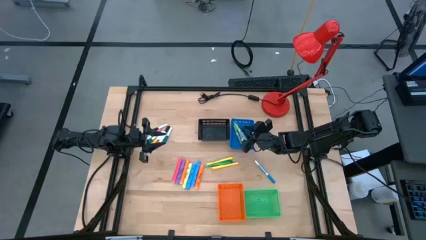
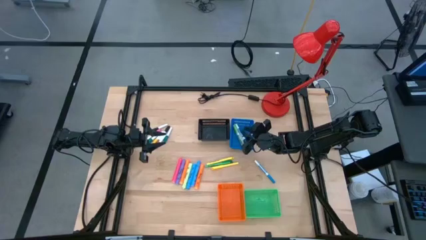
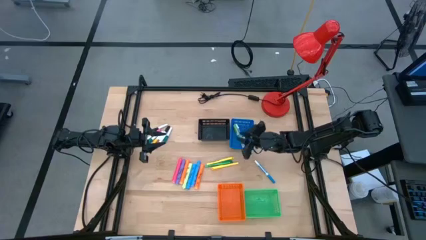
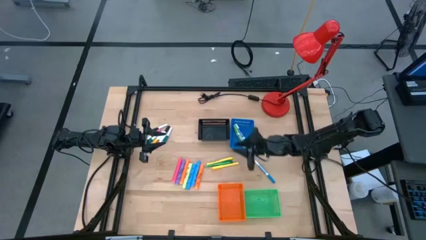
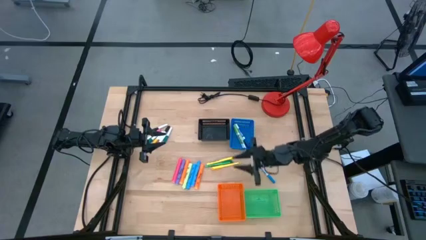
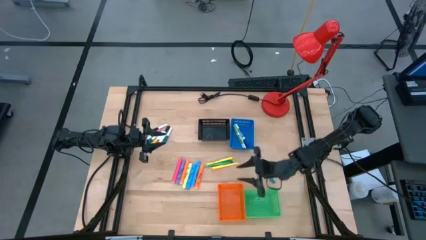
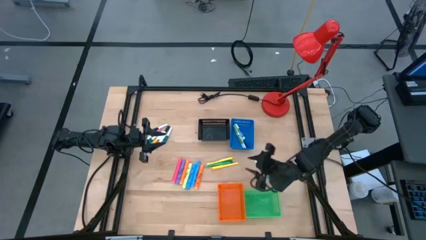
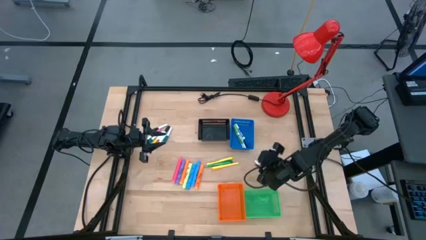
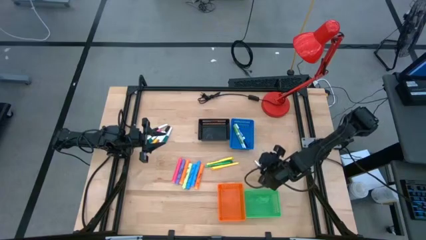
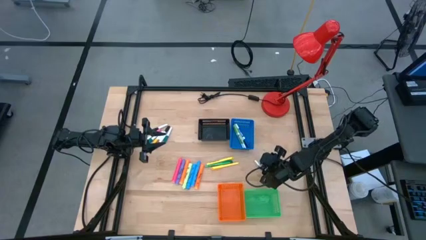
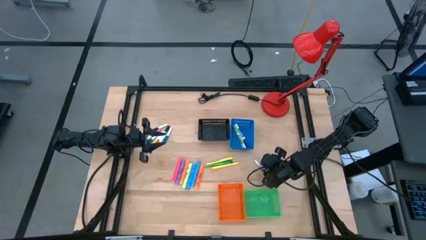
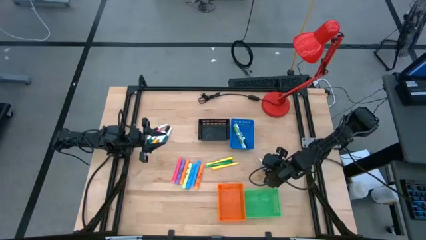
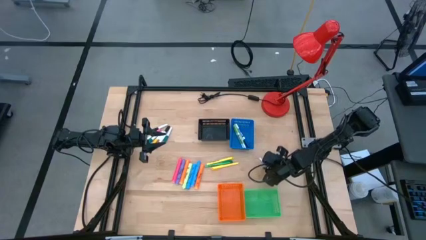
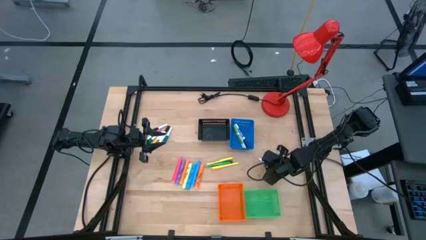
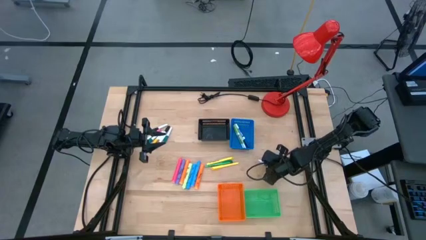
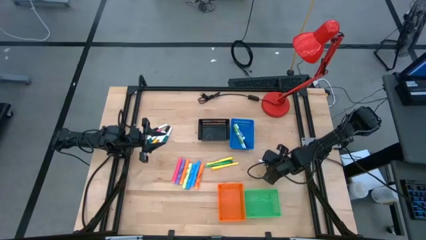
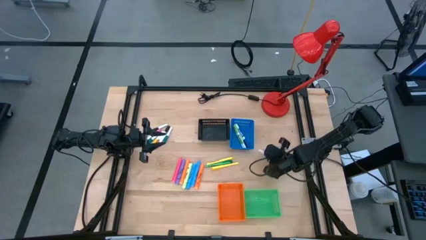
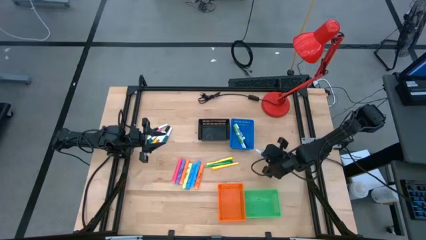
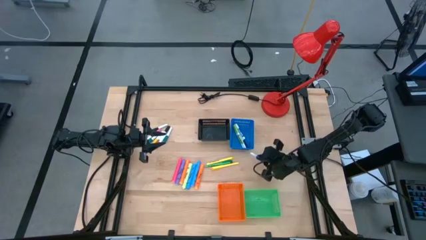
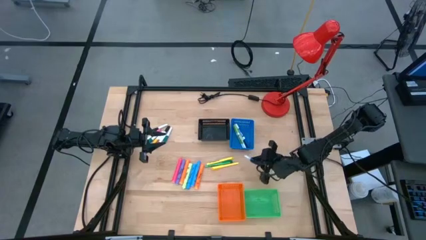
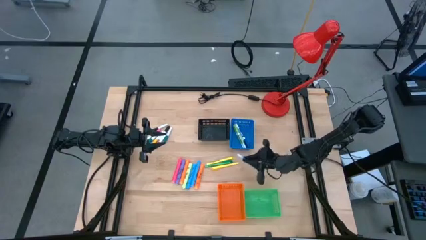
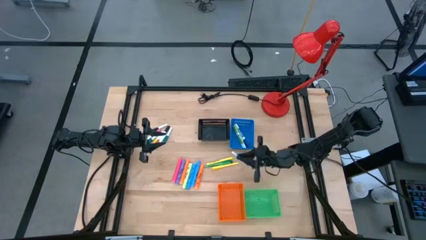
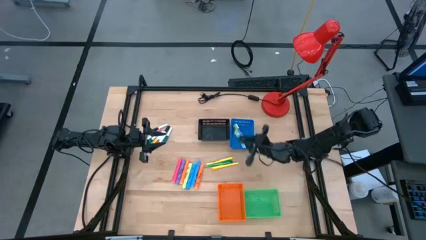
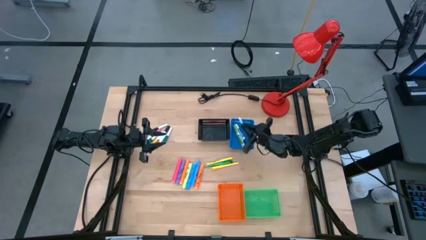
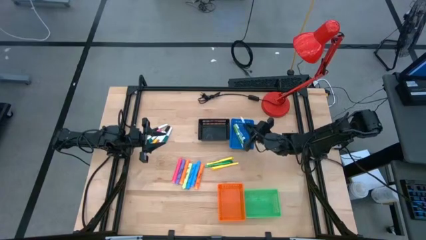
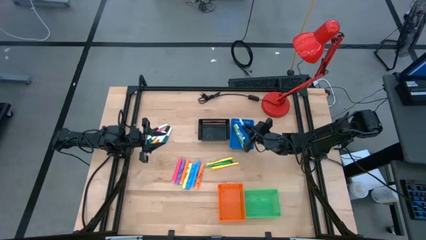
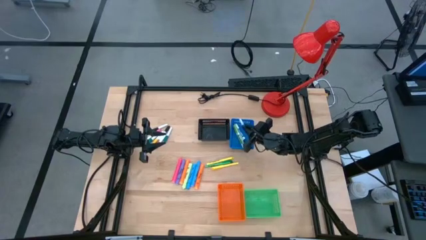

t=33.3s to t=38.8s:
Task: Pick & Place Markers
Put the blue marker pen into the blue bin

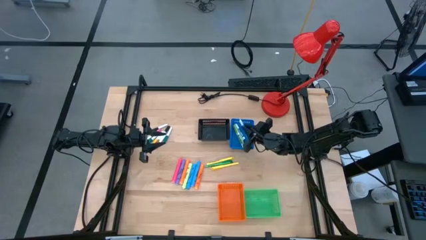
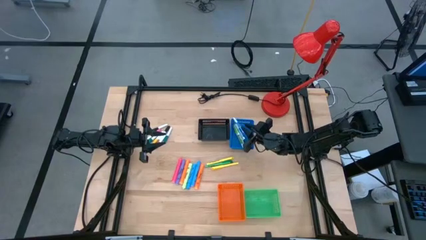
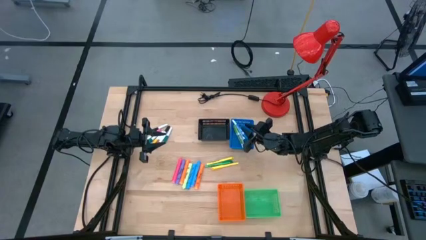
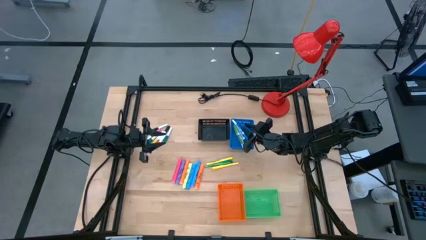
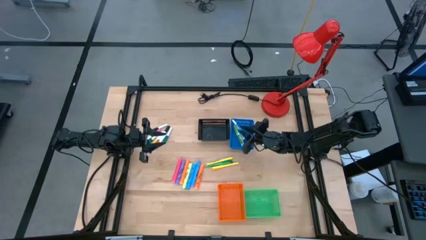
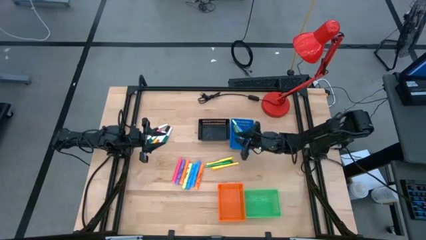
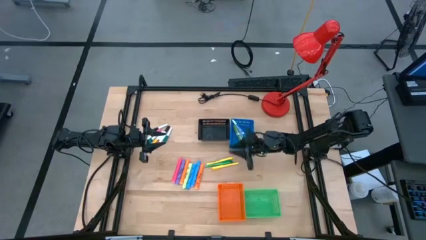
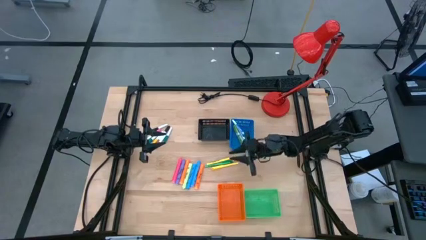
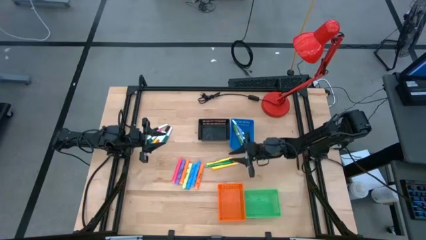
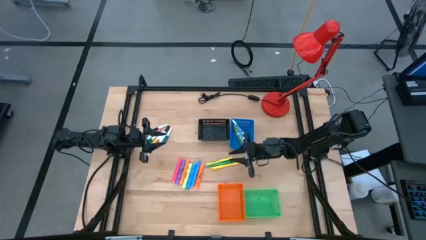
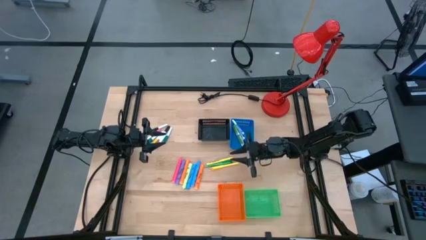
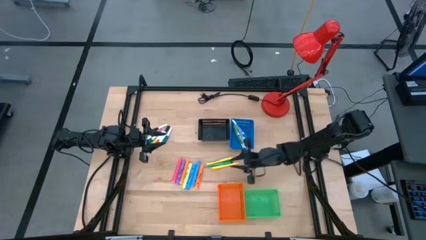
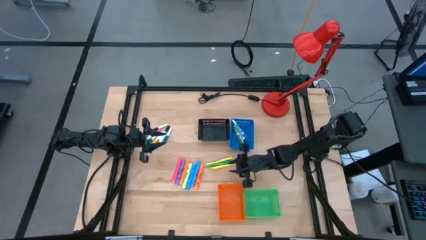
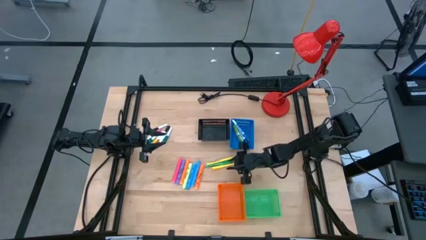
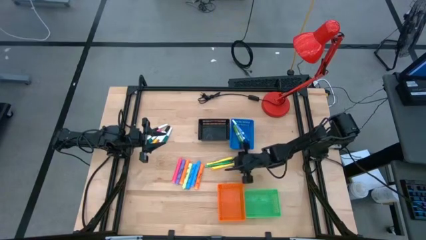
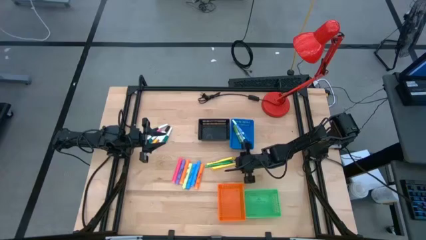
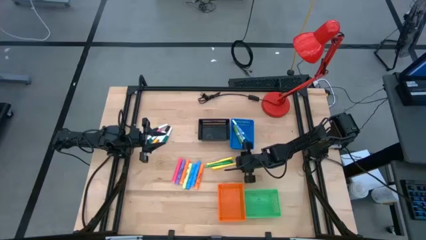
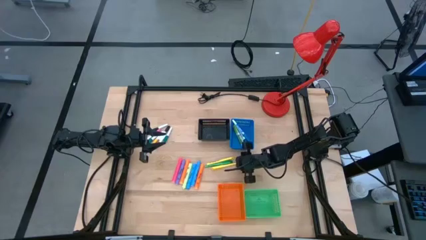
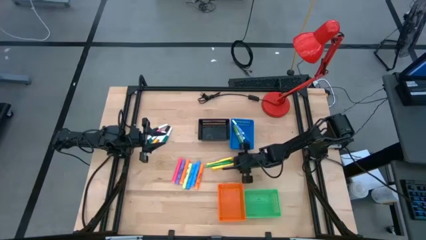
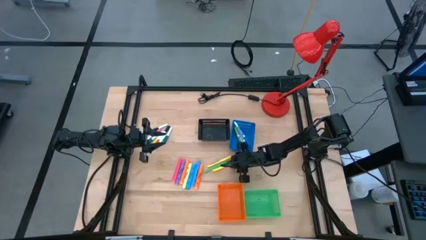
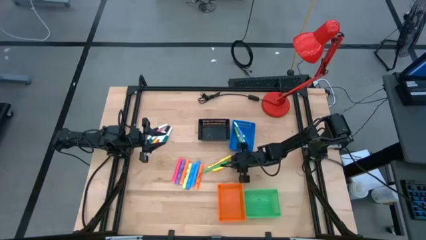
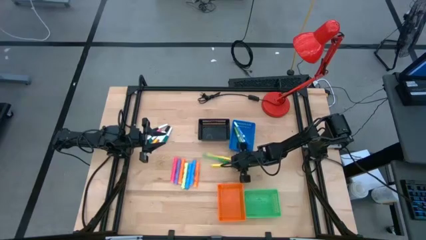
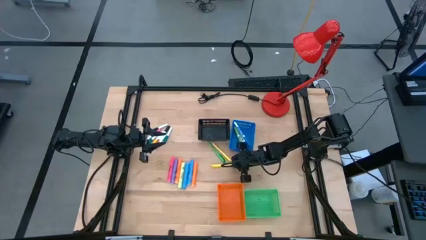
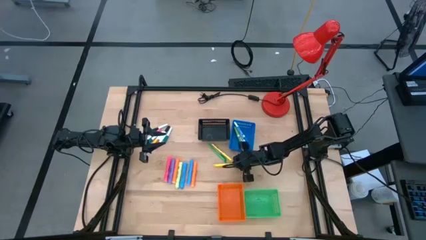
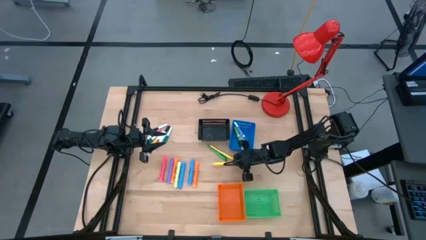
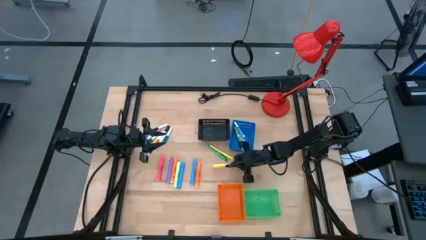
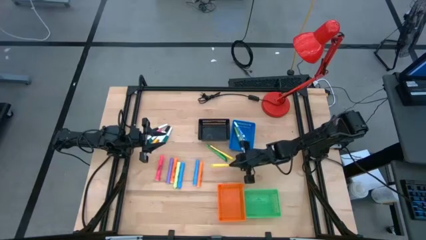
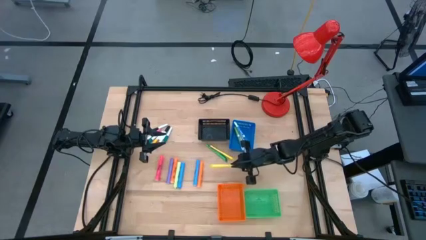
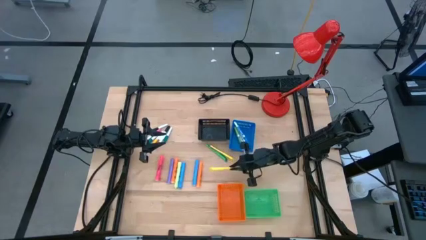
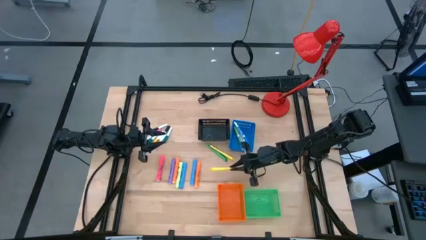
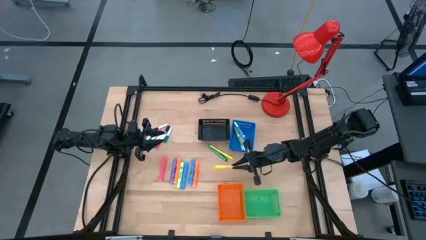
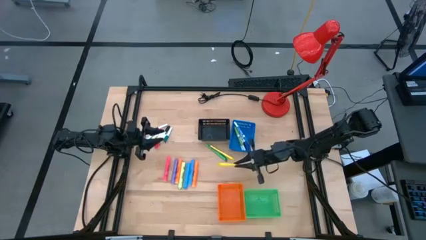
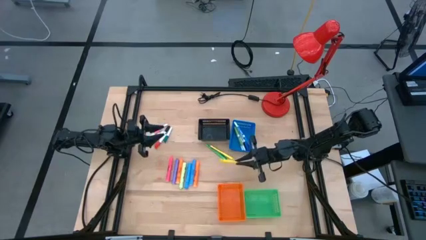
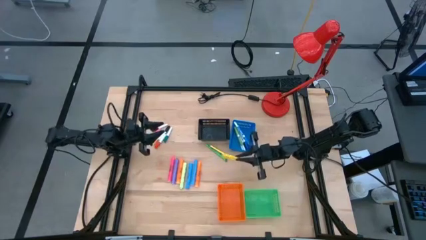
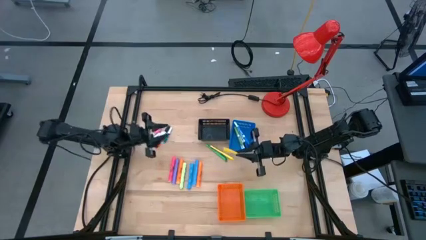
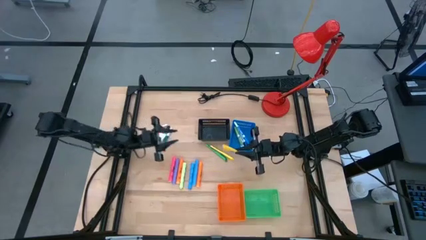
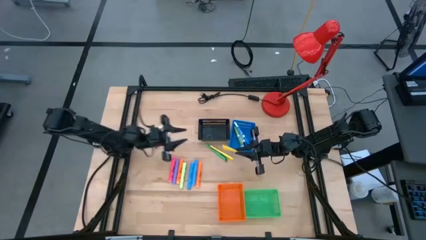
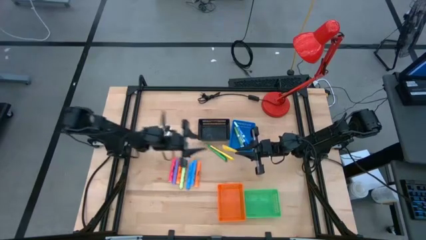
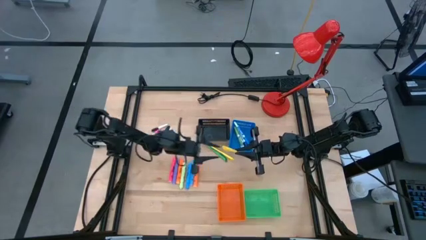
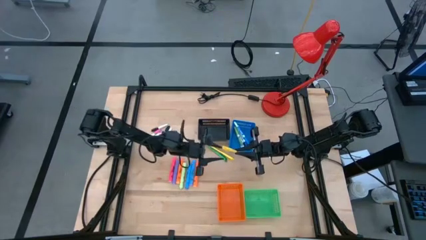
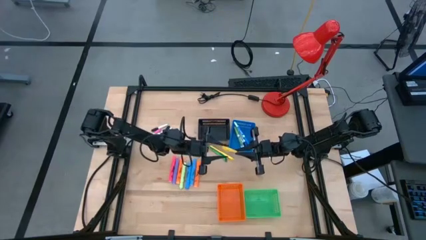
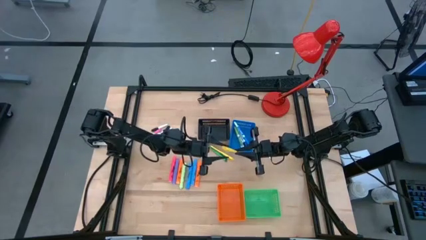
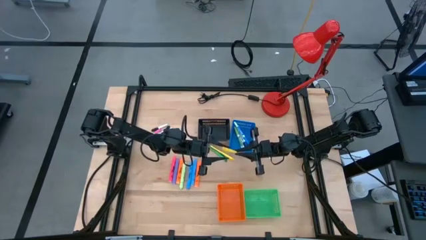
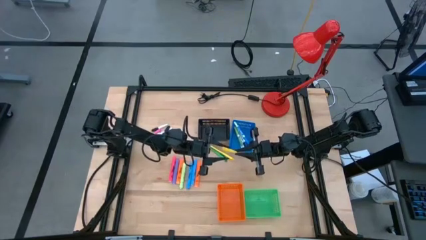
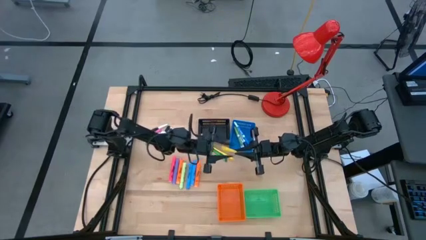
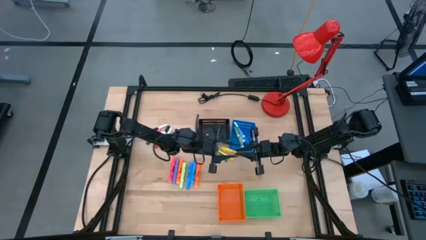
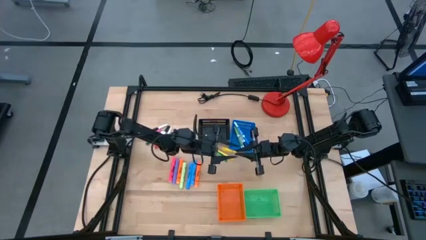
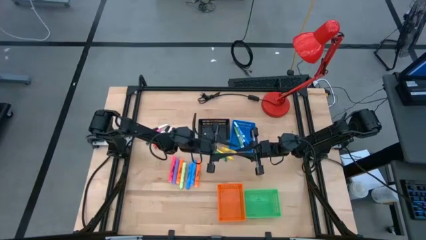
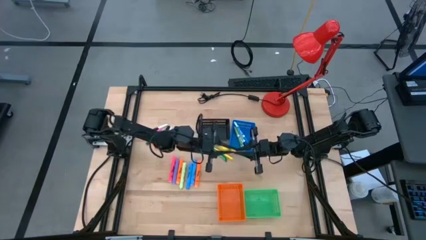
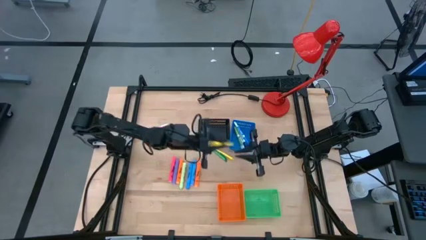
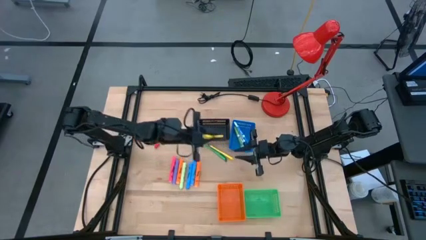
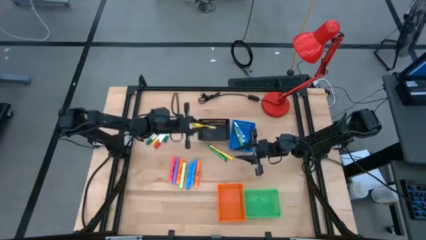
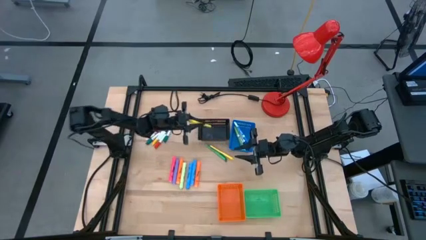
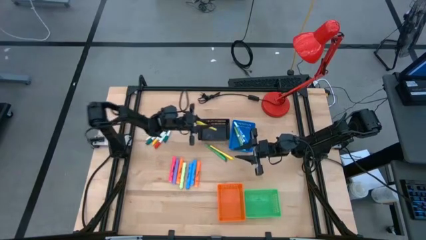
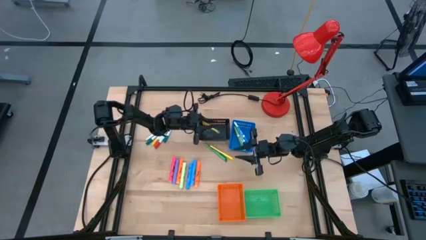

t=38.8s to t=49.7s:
Put the yellow pen into the black bin

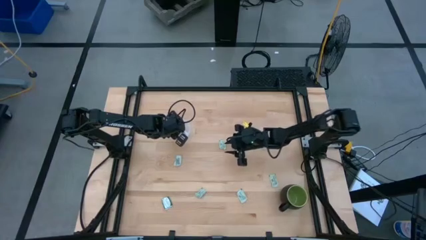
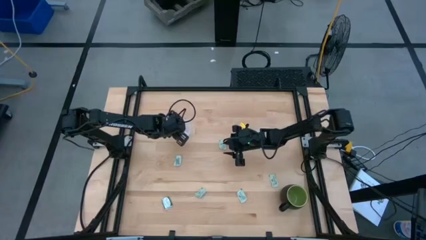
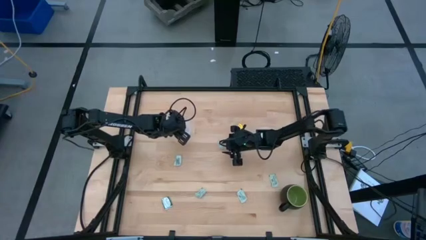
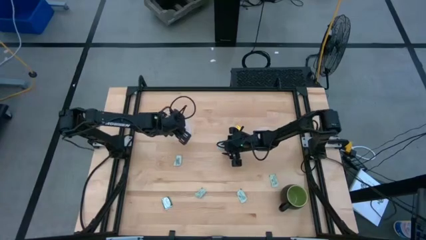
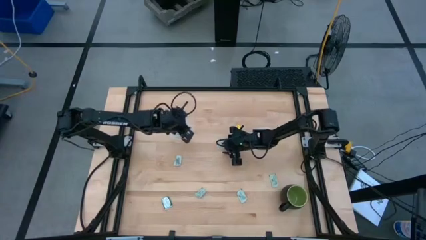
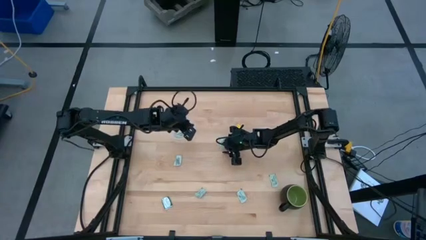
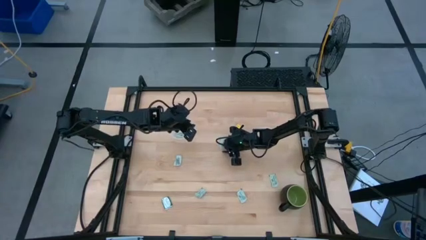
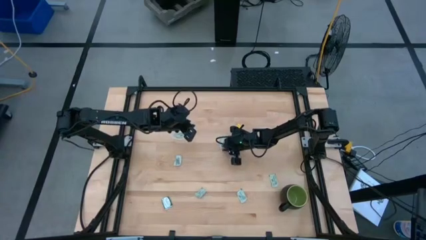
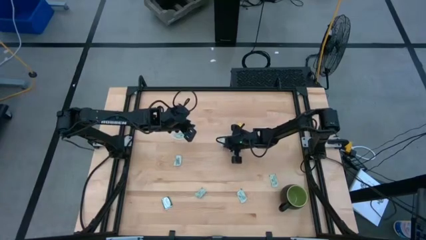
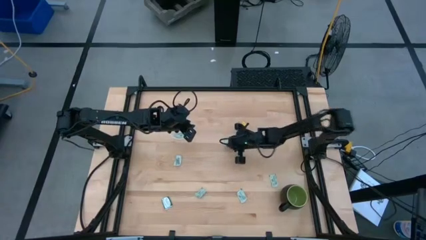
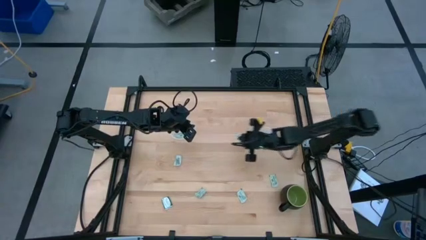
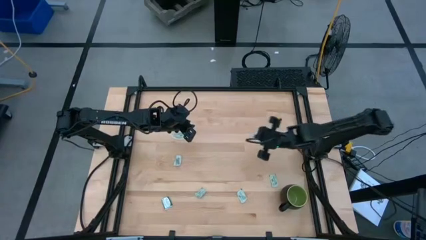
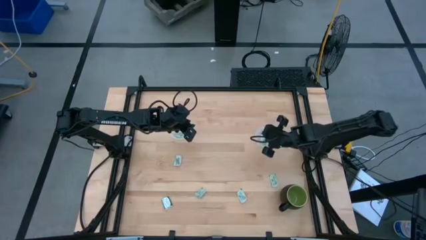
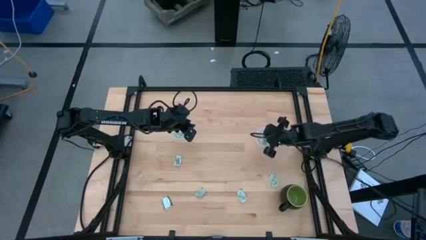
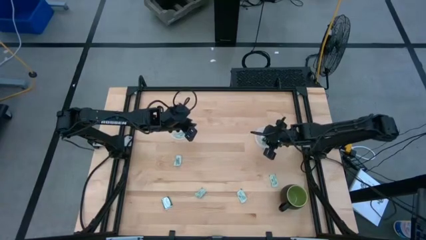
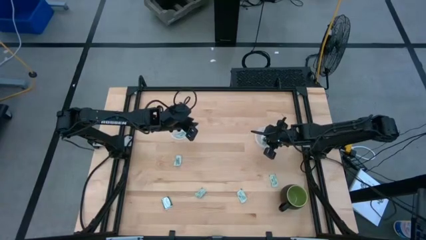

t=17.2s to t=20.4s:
Task: Pick and place Stevia / Truvia into bins
Put the stevia packet into the right transparent container
